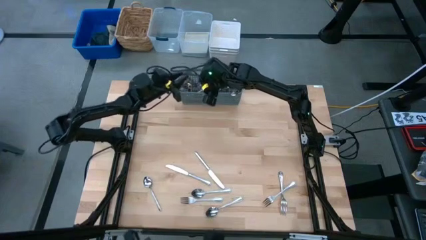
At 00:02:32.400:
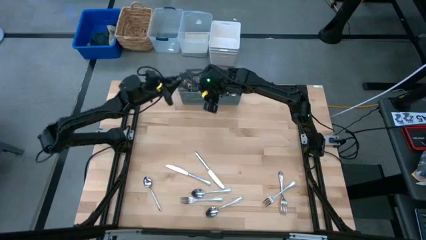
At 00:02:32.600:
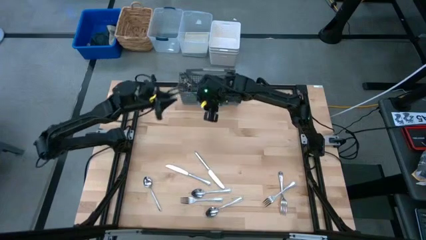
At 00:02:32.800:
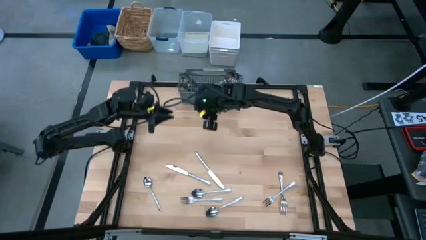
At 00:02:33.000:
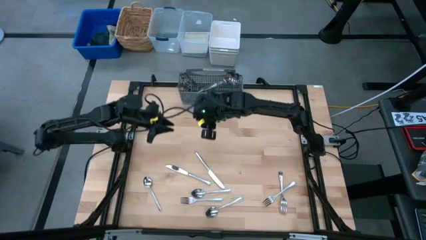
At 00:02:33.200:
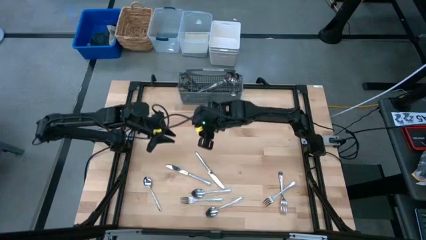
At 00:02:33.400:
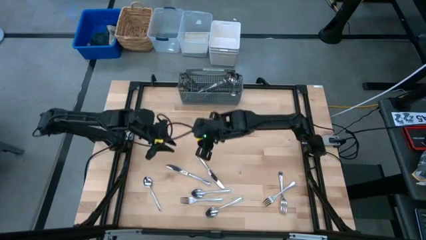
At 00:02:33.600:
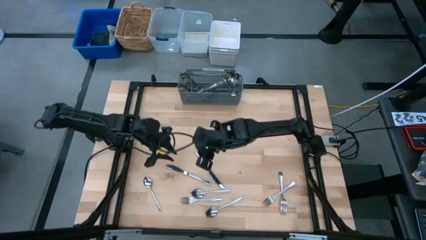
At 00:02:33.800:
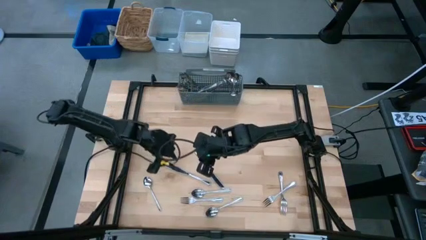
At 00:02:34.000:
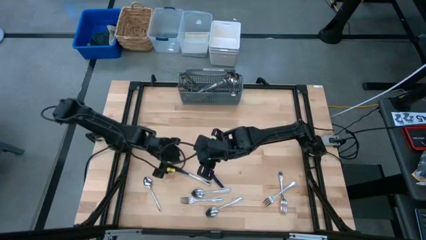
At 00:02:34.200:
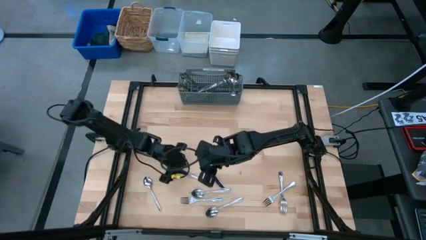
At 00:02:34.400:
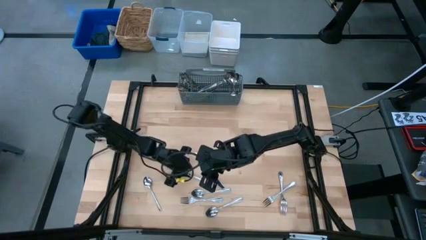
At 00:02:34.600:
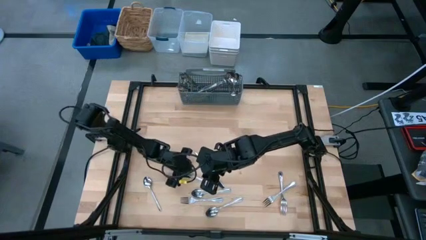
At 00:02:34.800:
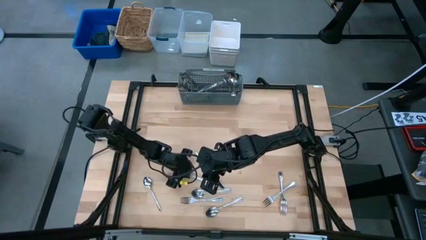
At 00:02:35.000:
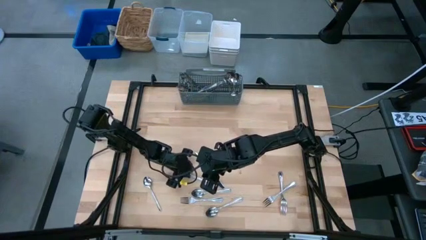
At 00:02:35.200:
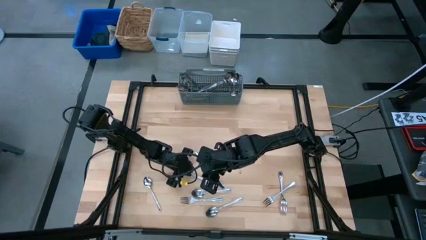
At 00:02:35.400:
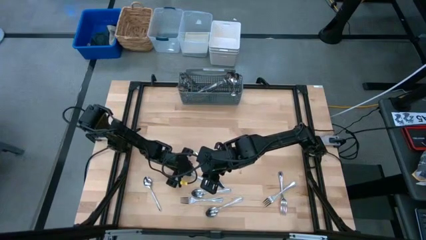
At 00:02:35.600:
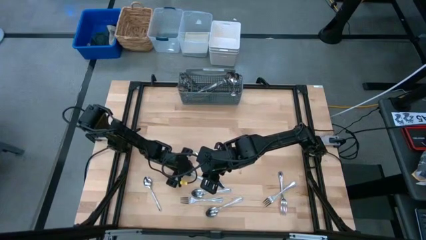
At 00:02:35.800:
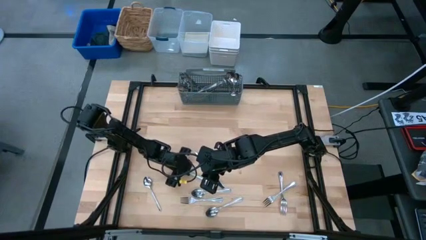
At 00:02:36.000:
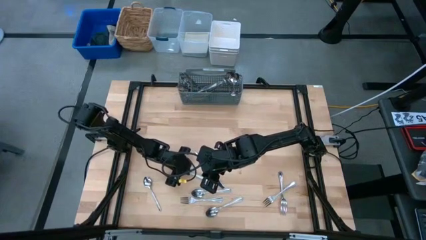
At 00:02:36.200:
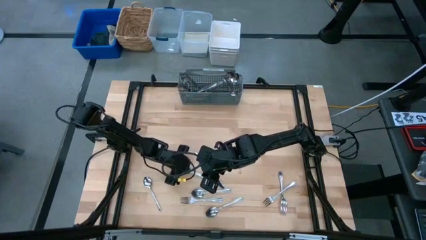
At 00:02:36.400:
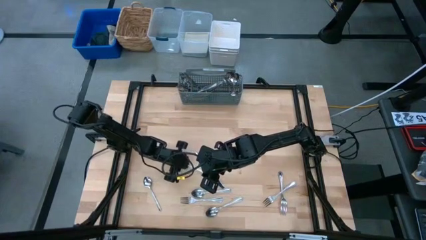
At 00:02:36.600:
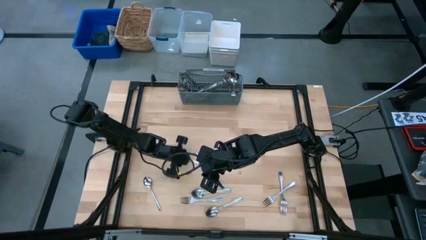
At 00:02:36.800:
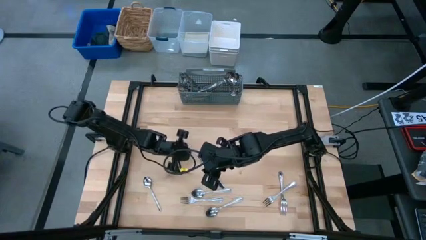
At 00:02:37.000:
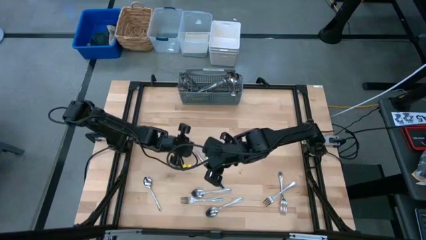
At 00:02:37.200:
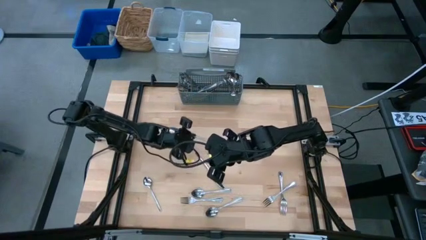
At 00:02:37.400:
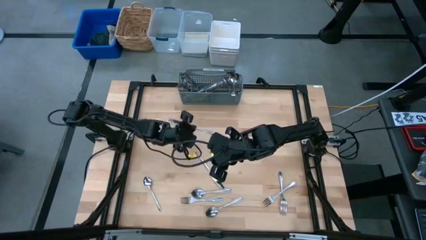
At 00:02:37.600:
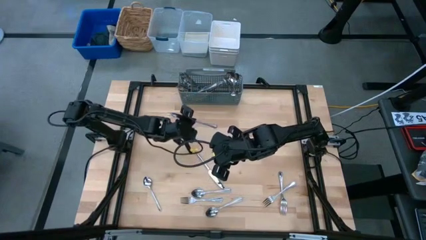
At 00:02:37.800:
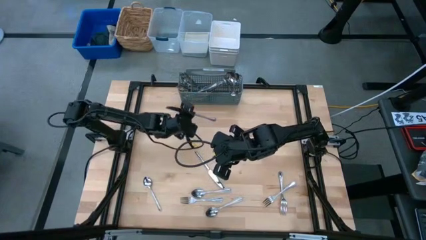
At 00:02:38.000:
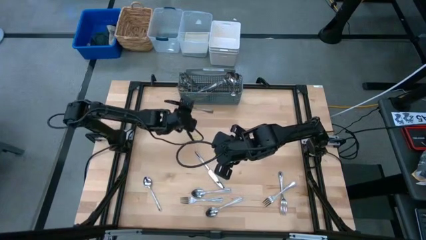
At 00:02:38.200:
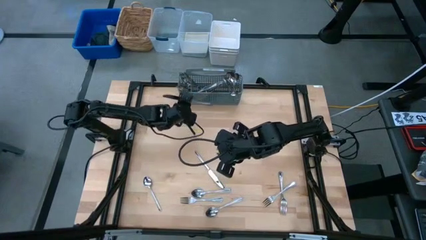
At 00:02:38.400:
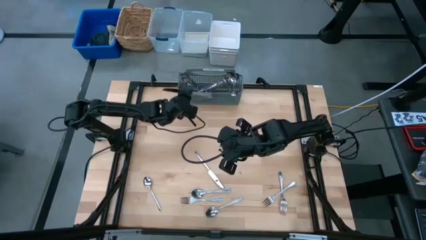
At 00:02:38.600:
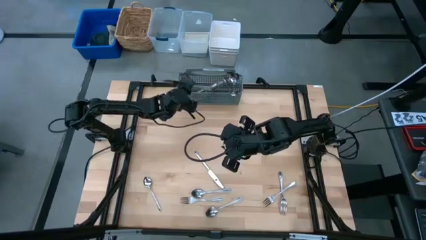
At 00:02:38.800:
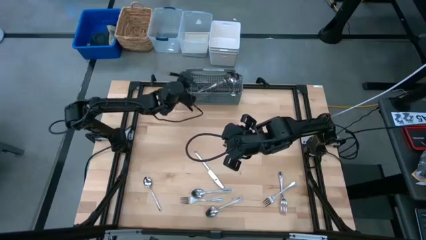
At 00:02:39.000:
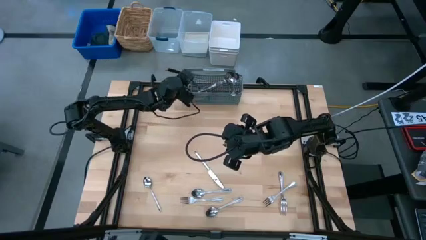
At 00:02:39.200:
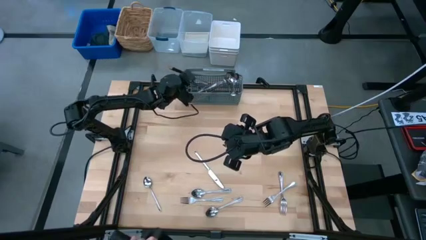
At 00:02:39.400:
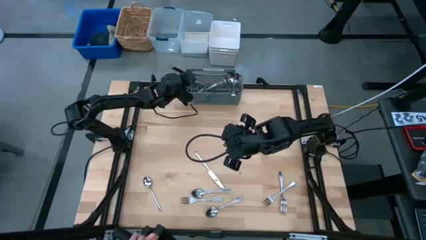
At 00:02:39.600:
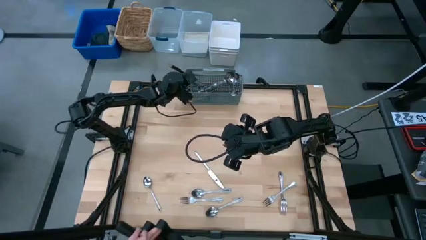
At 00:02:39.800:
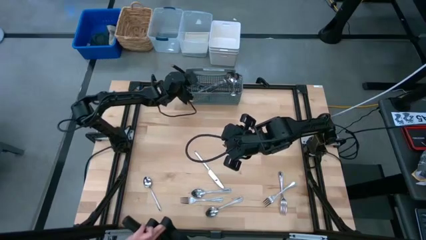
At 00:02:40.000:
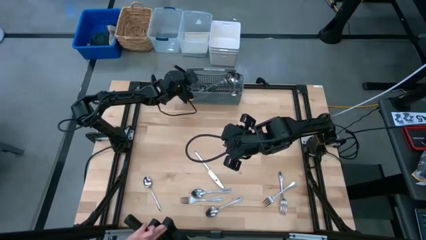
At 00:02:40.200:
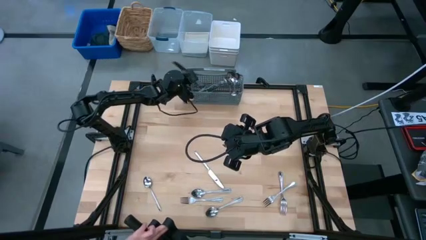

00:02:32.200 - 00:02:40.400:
Put the silver knife into the dishwasher utensil holder
